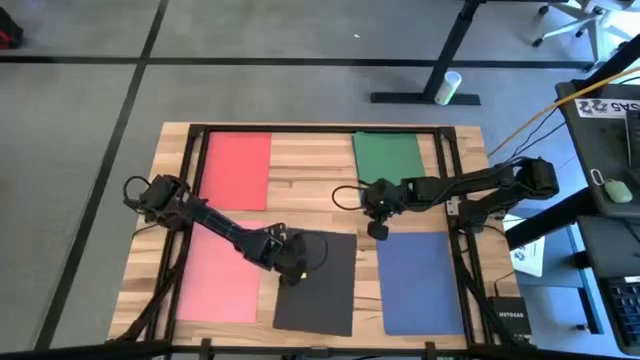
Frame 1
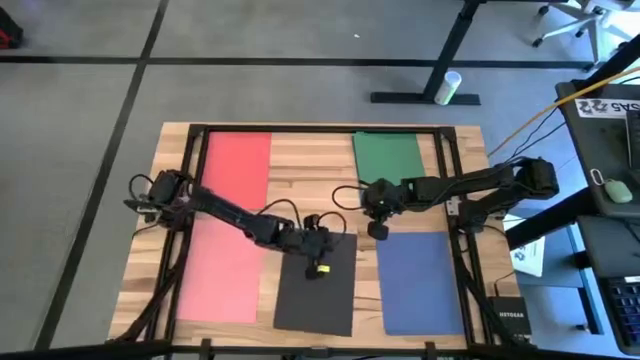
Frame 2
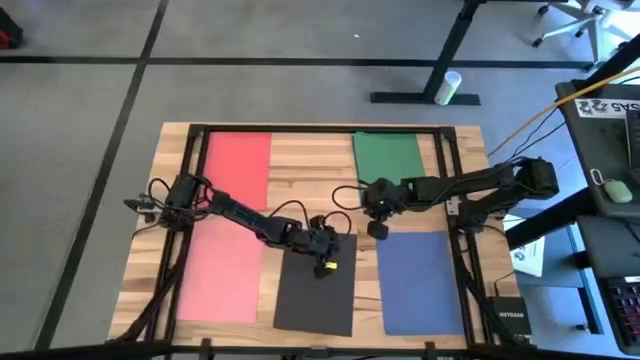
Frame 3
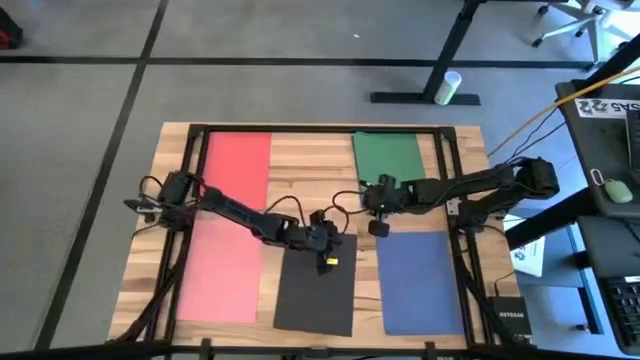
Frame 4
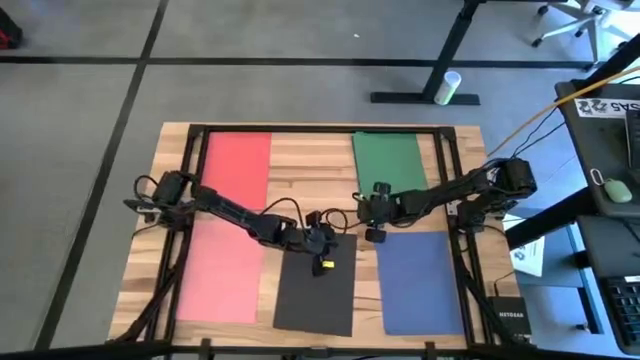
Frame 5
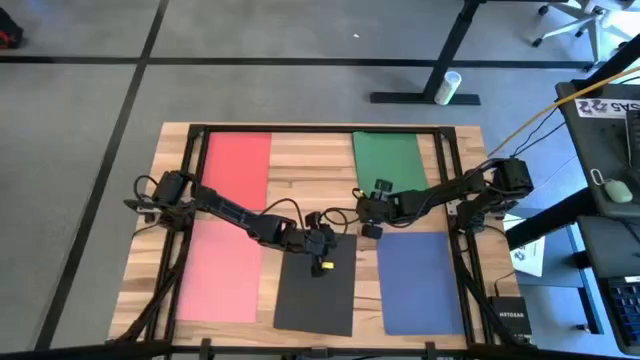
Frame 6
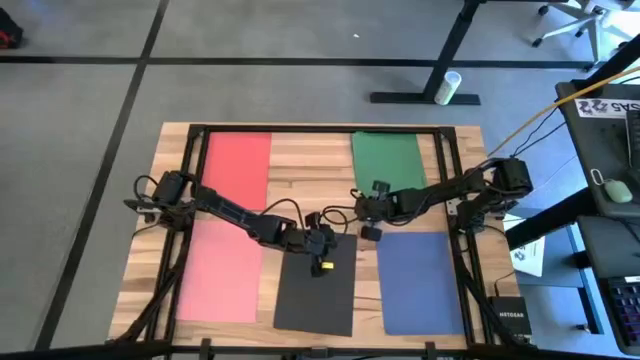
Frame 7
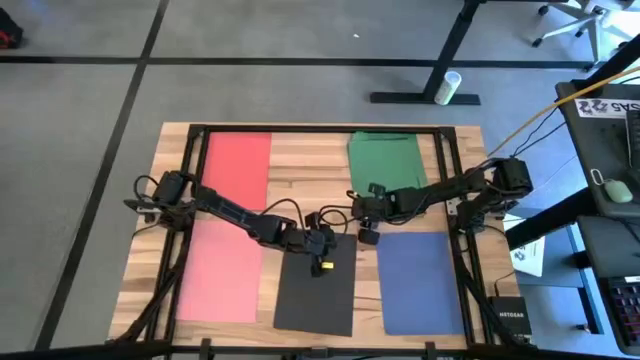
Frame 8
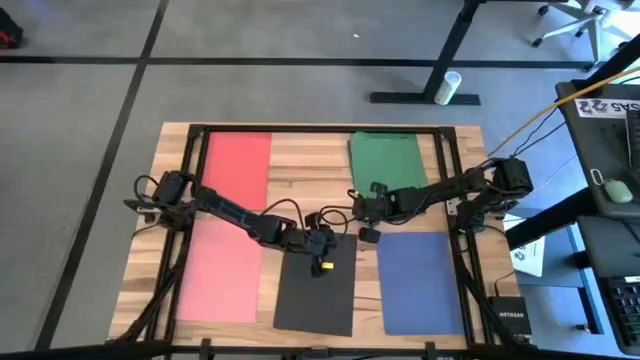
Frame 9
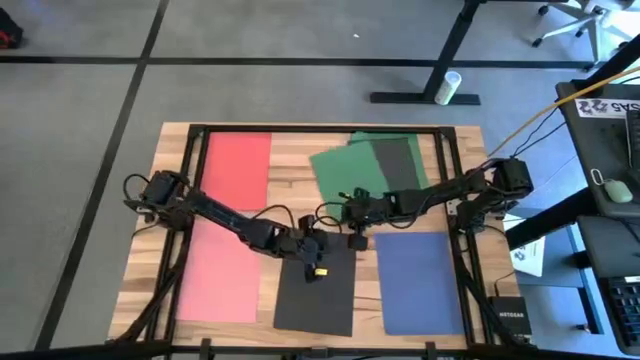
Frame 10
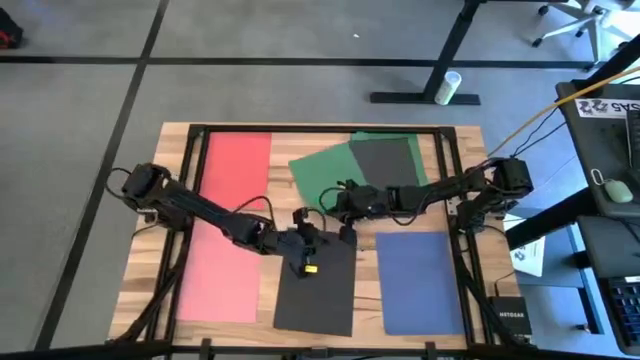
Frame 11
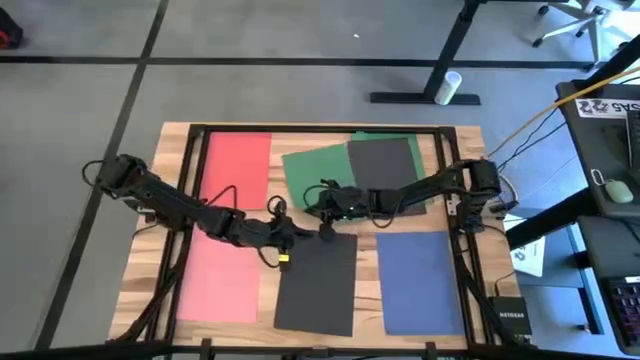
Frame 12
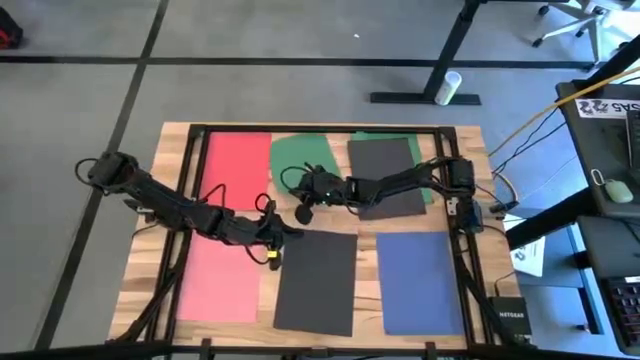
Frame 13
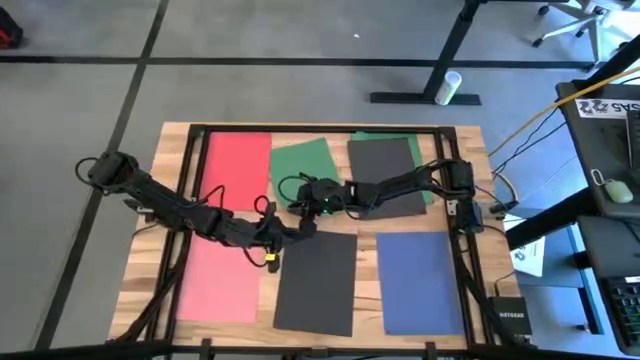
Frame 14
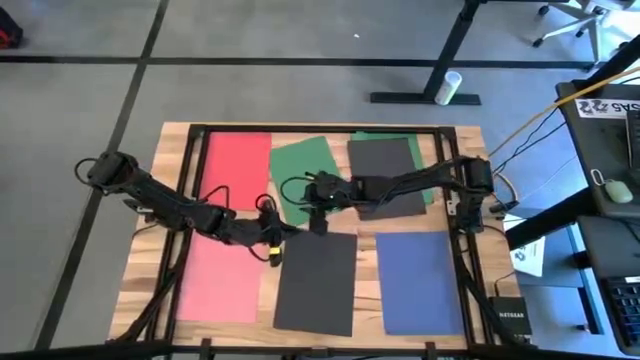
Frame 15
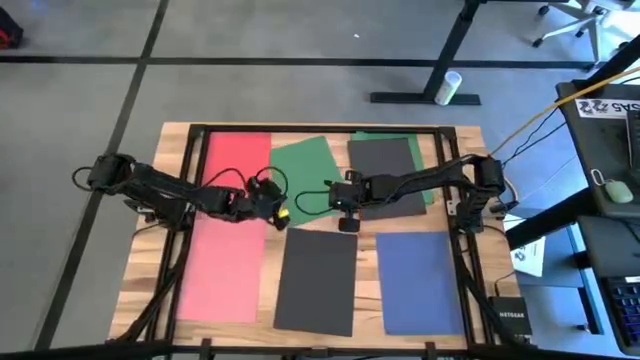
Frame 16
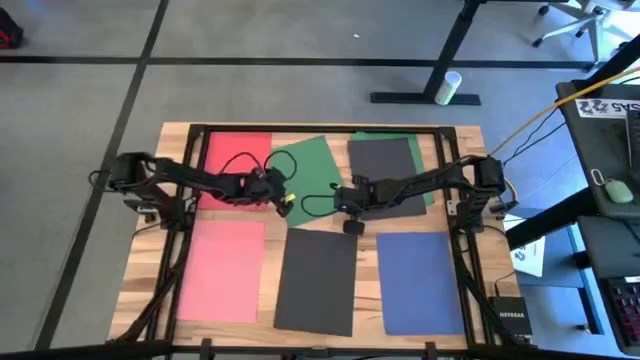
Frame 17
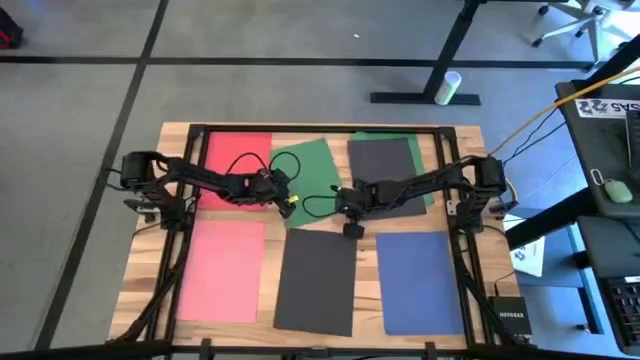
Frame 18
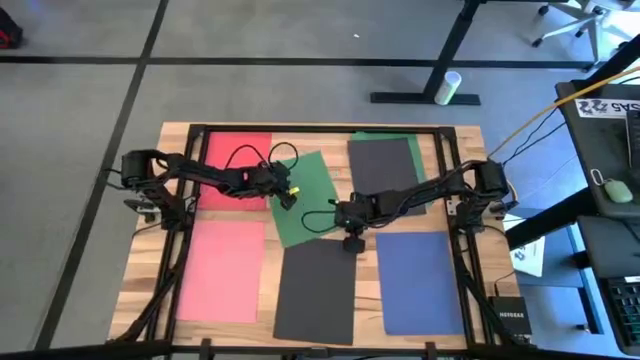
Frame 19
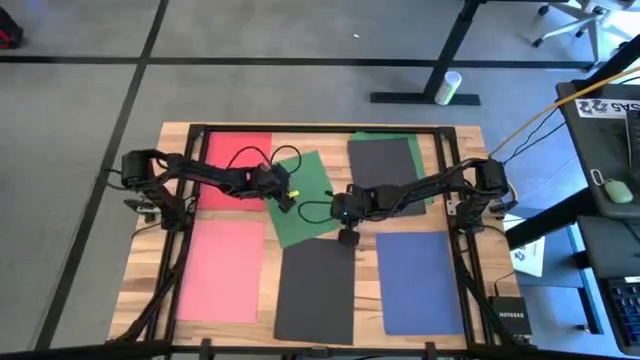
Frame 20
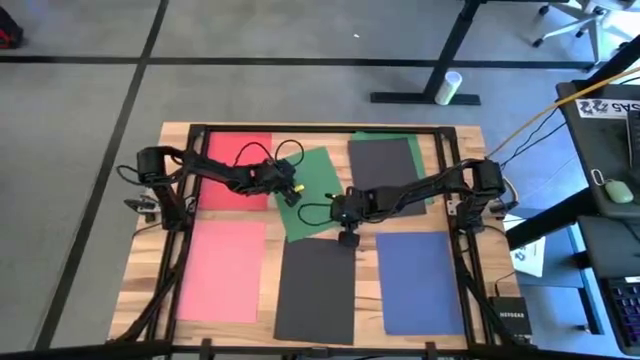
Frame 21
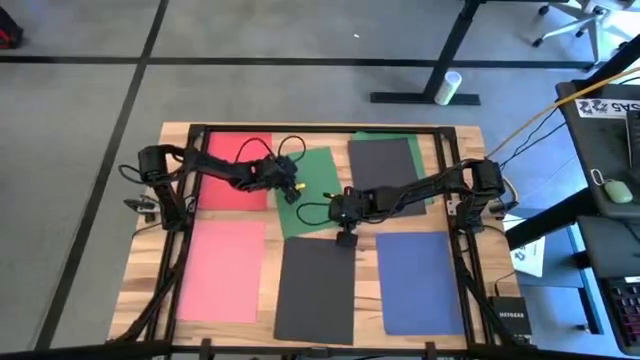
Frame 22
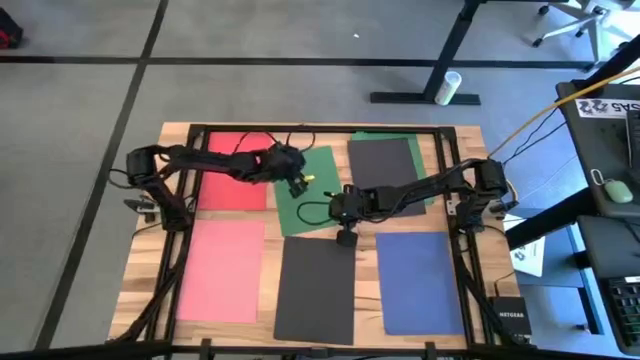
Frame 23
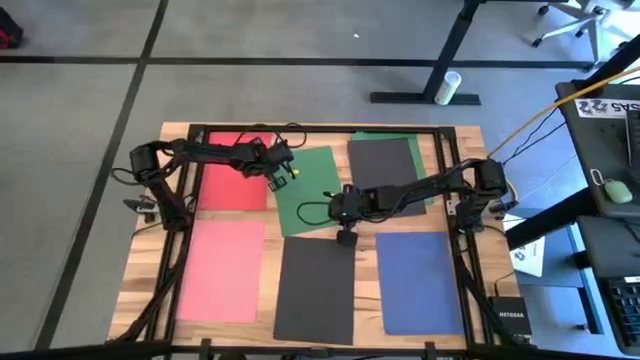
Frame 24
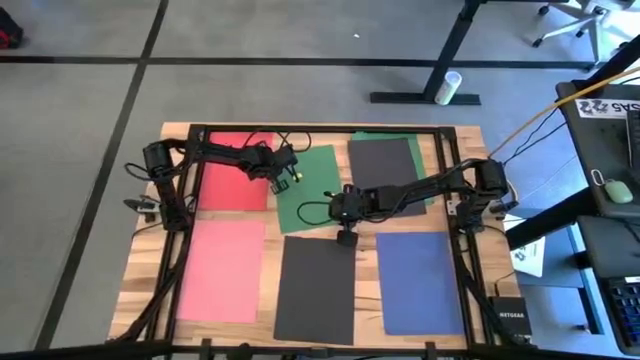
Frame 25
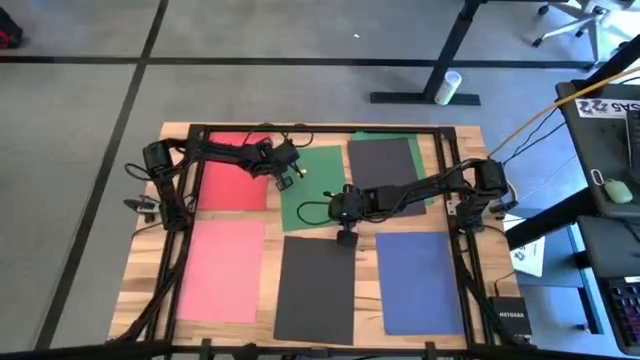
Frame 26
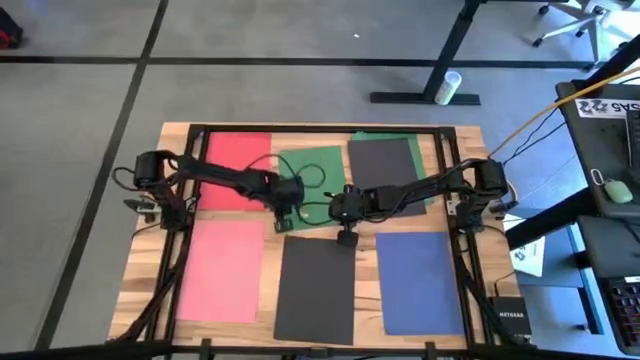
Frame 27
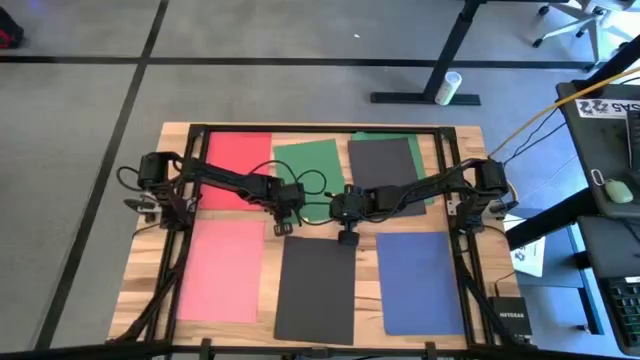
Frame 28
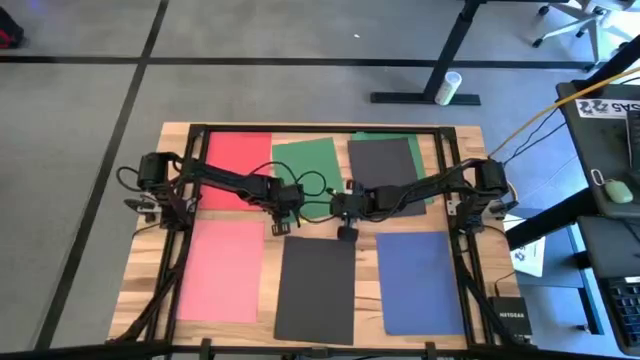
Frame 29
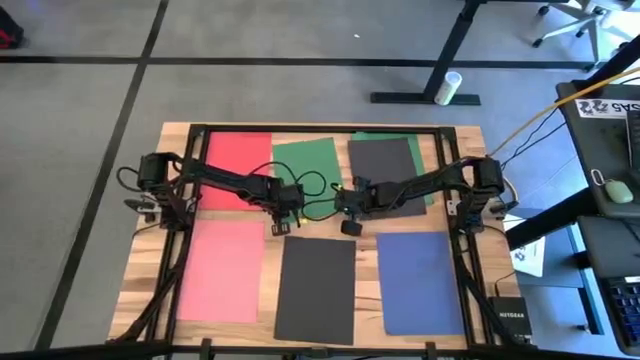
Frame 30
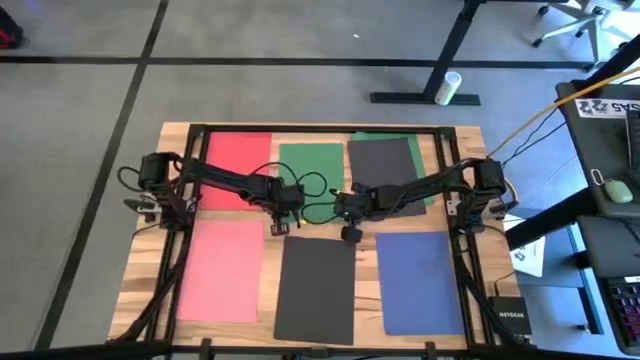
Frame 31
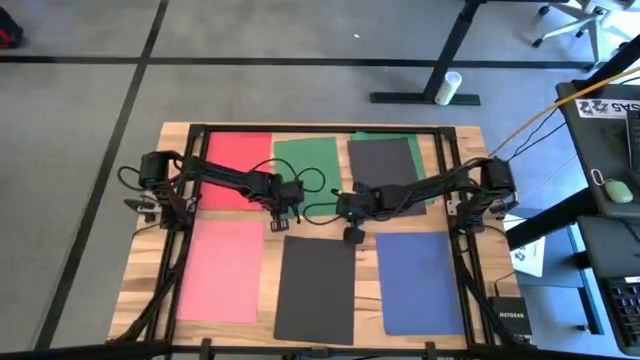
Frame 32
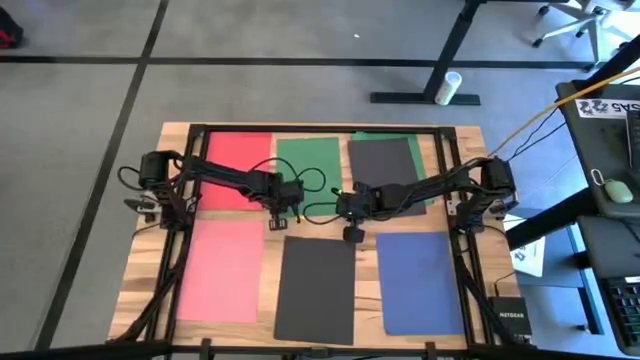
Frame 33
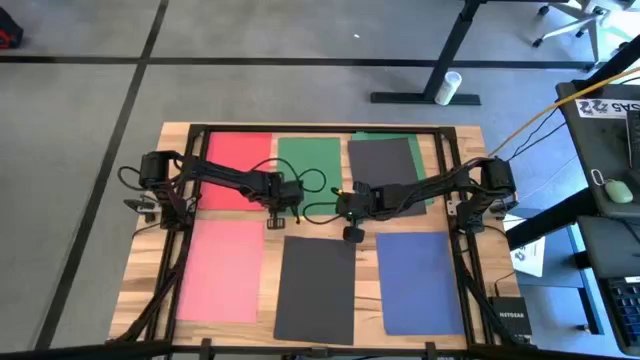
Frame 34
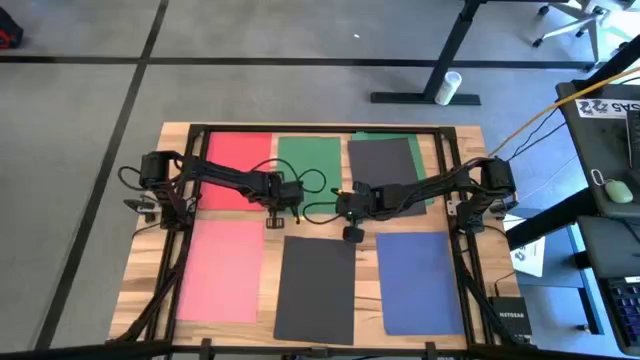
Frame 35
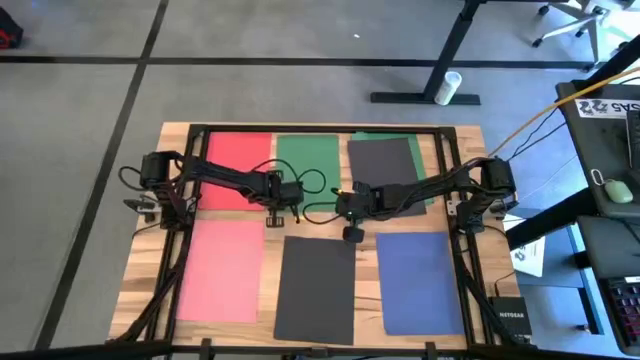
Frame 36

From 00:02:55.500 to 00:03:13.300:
Task: Organize paper
Put the green paper on the top center of the table

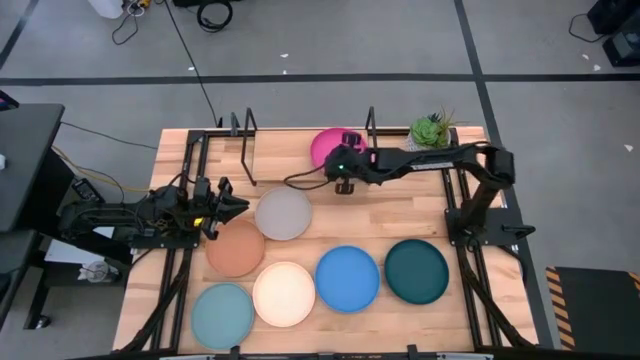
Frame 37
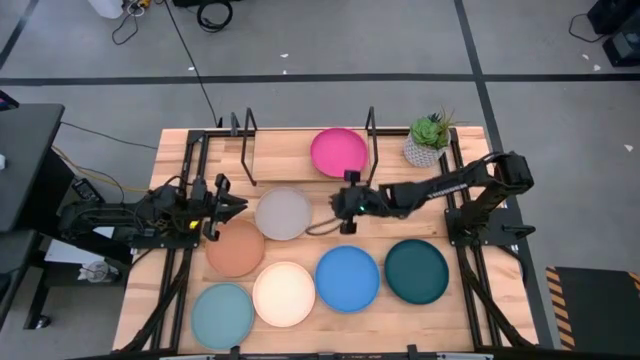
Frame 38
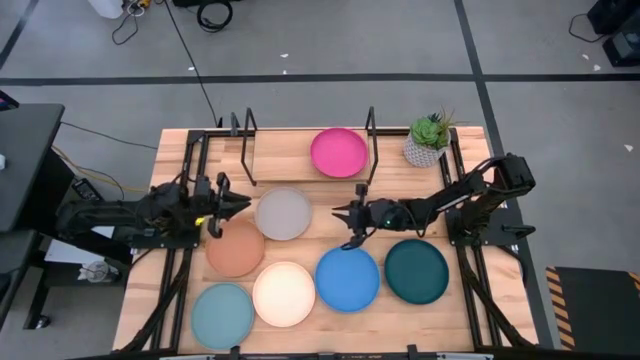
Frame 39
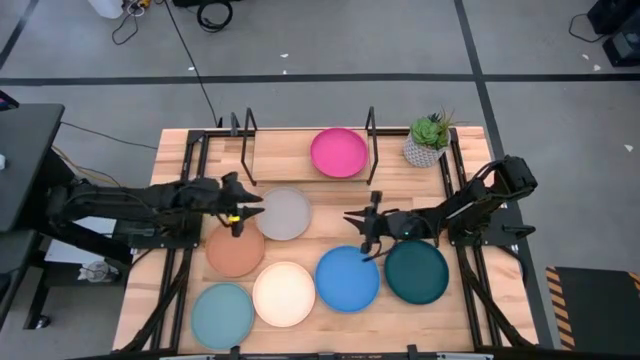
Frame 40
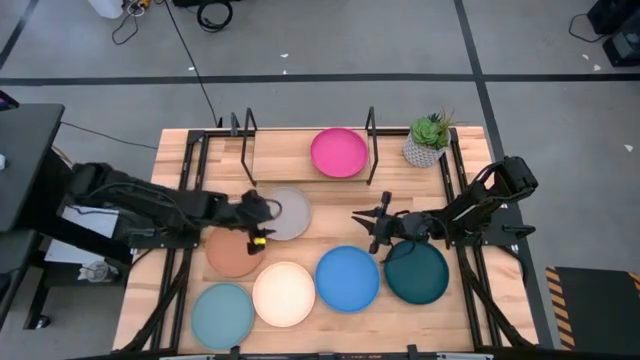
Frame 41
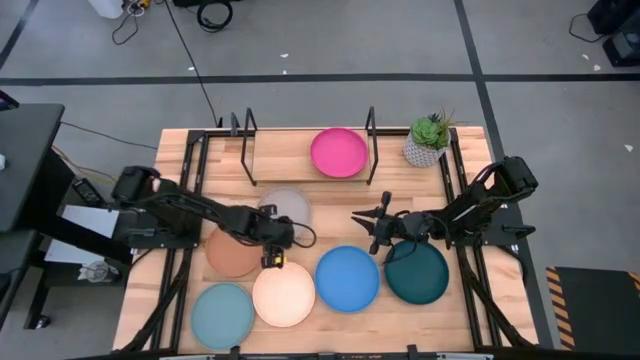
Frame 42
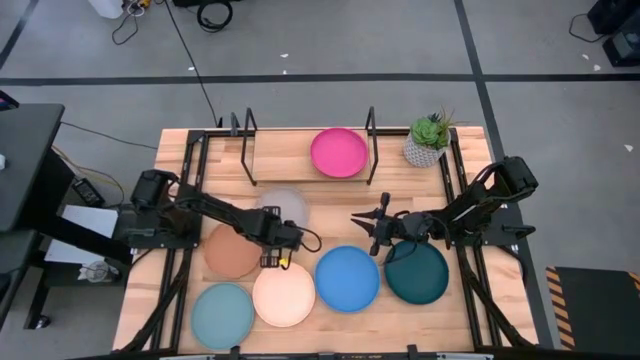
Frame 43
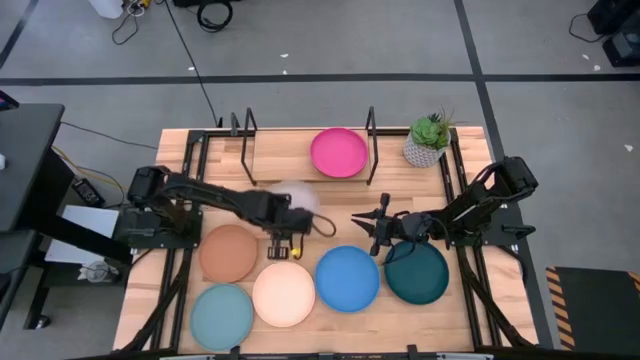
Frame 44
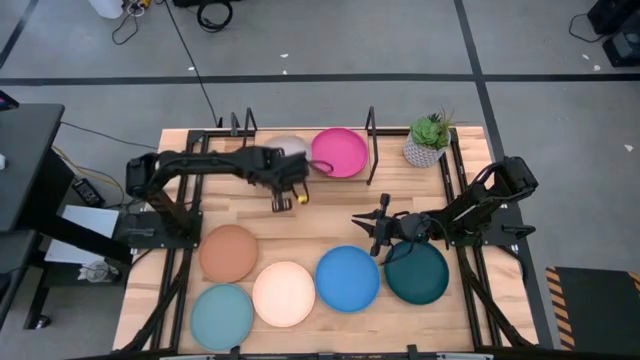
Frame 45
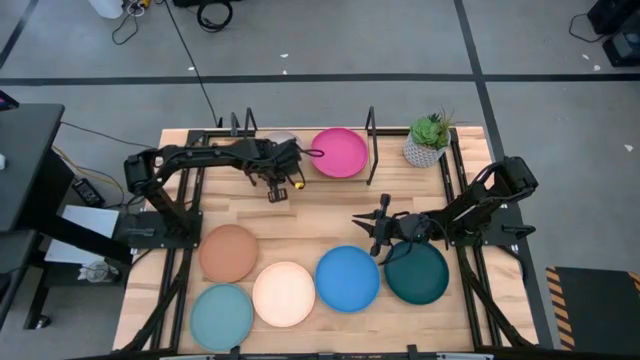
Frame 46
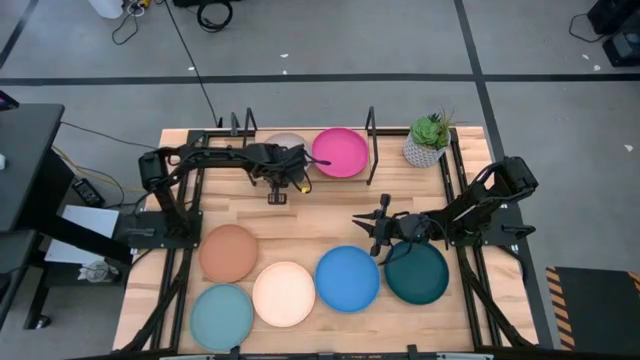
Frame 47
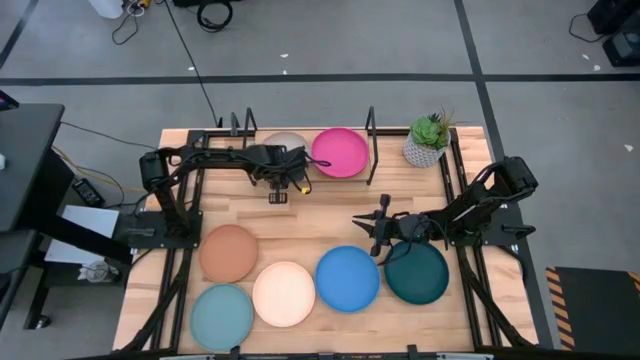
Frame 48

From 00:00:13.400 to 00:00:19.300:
Task: Place and stack plates onto a shelf
Put the grey plate on the shelf
